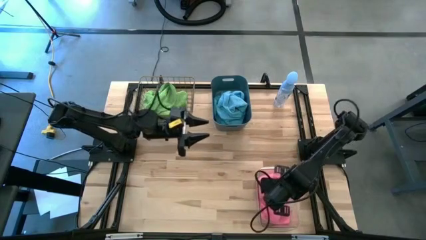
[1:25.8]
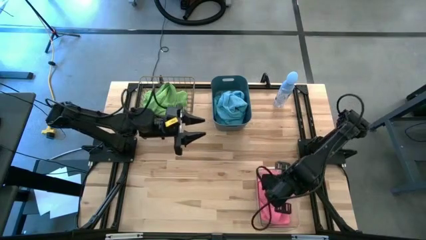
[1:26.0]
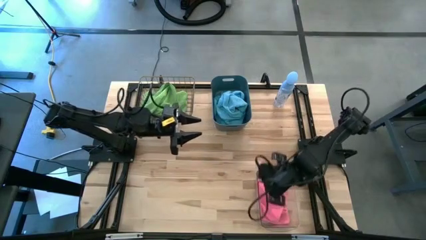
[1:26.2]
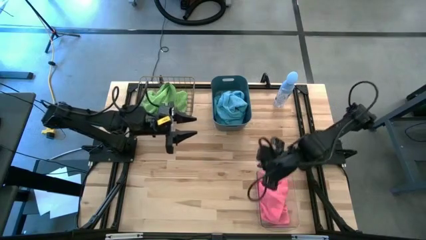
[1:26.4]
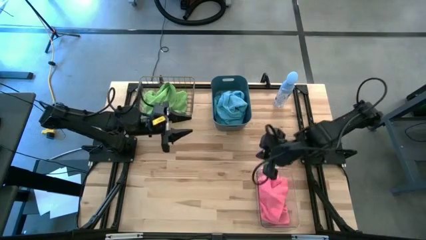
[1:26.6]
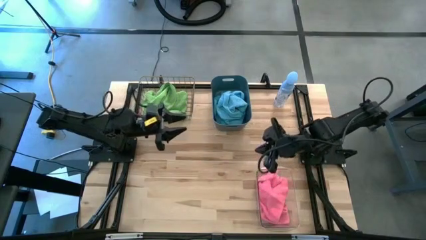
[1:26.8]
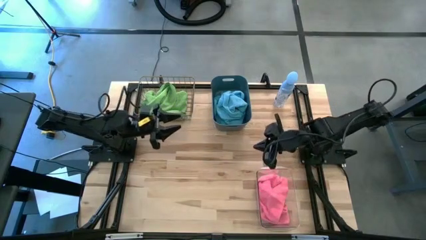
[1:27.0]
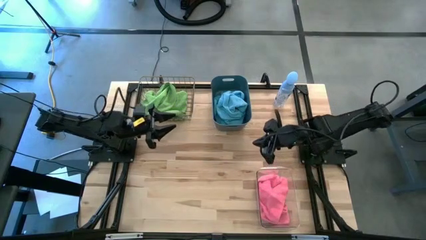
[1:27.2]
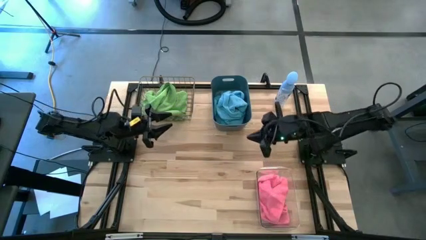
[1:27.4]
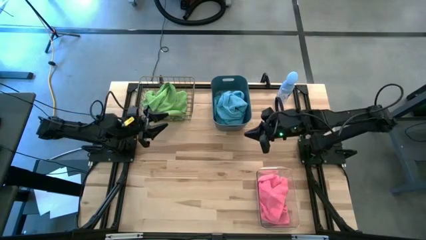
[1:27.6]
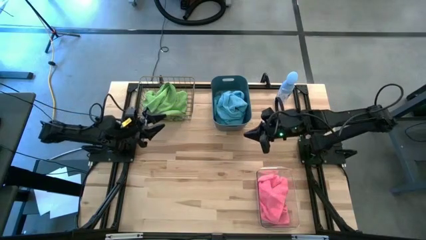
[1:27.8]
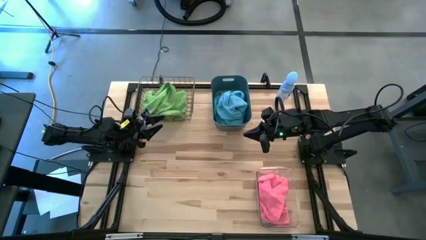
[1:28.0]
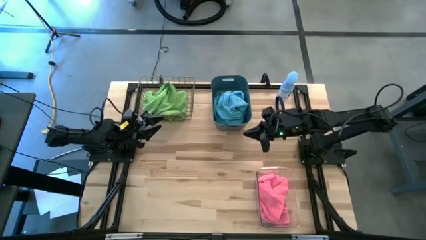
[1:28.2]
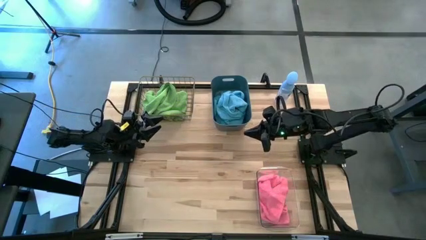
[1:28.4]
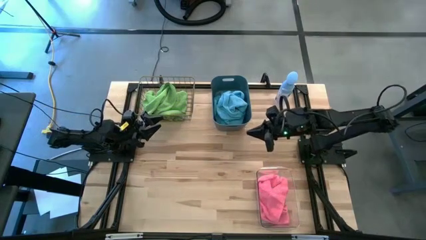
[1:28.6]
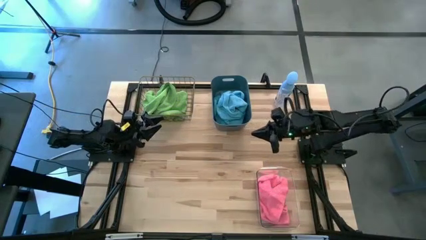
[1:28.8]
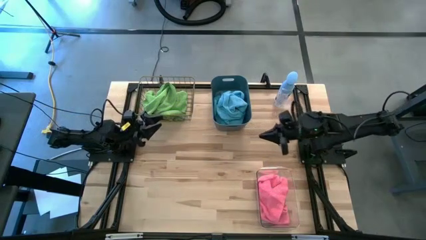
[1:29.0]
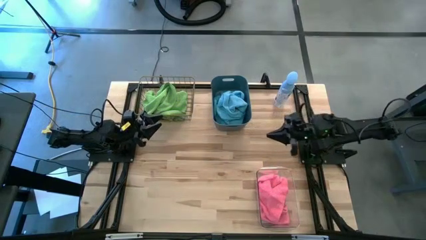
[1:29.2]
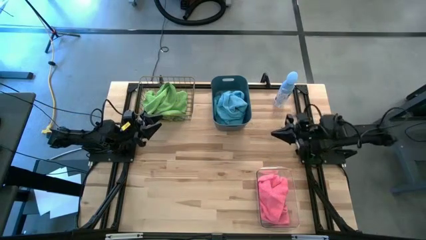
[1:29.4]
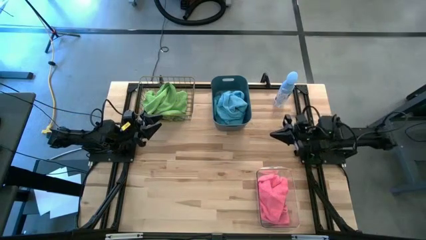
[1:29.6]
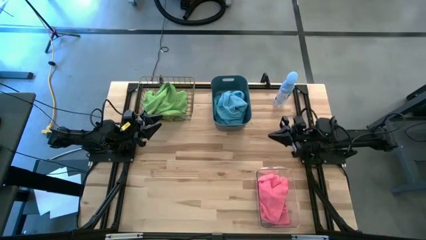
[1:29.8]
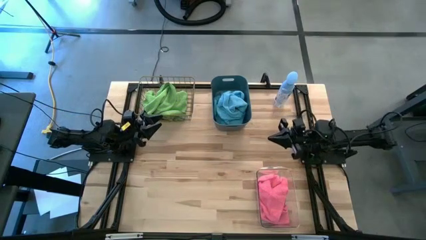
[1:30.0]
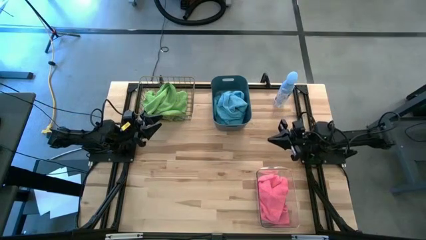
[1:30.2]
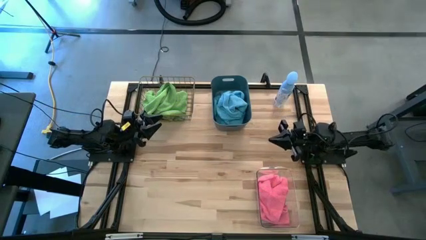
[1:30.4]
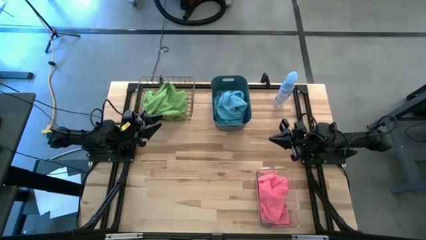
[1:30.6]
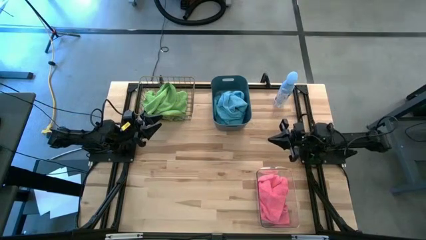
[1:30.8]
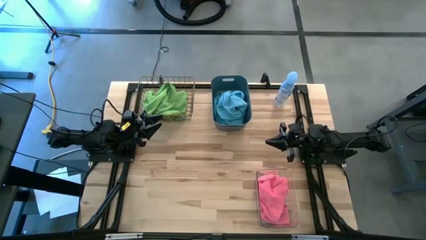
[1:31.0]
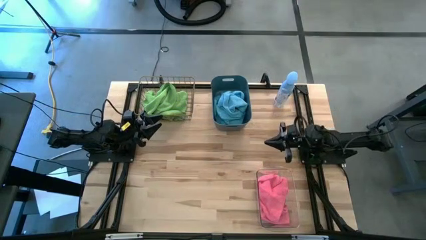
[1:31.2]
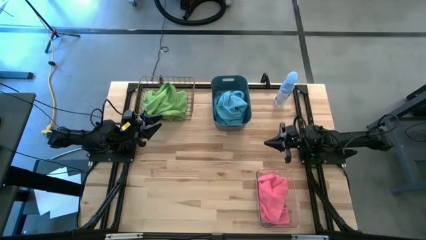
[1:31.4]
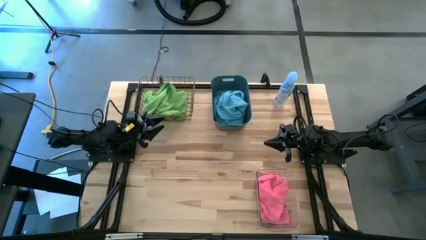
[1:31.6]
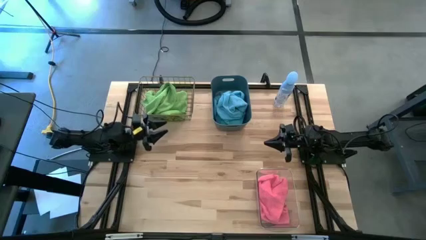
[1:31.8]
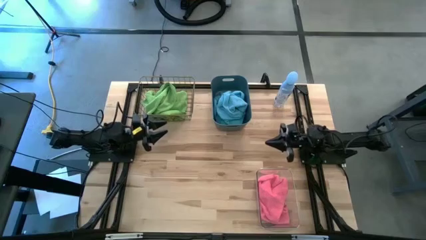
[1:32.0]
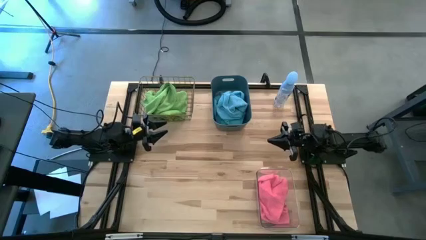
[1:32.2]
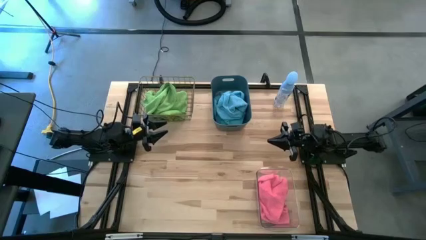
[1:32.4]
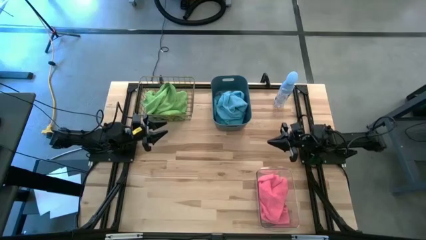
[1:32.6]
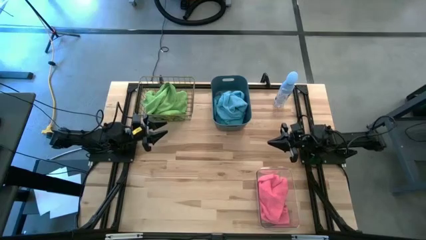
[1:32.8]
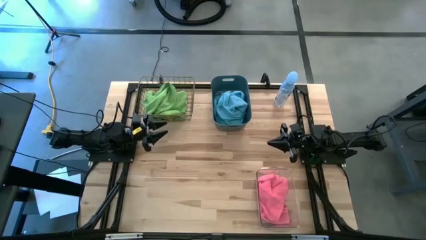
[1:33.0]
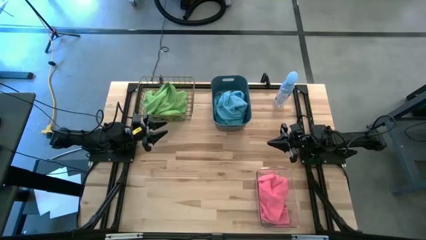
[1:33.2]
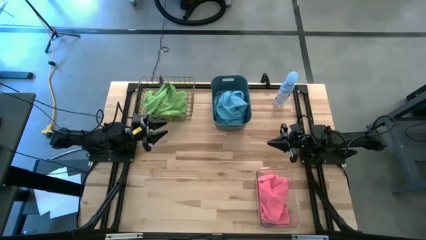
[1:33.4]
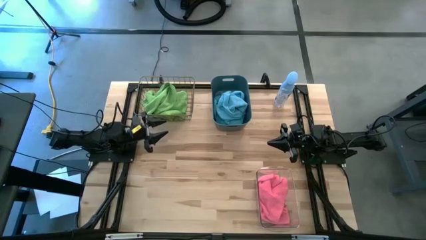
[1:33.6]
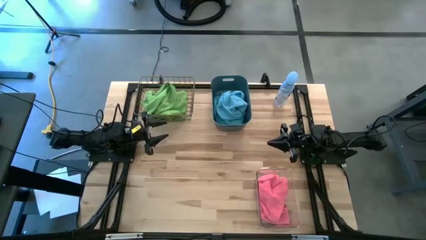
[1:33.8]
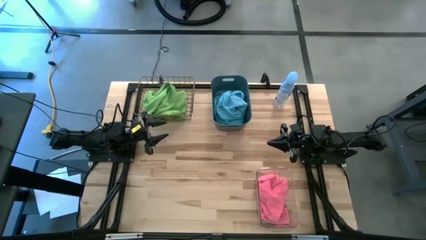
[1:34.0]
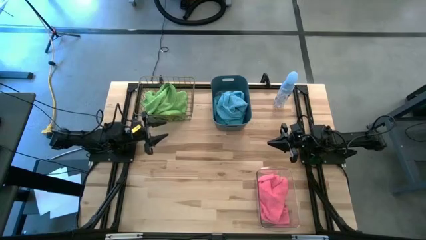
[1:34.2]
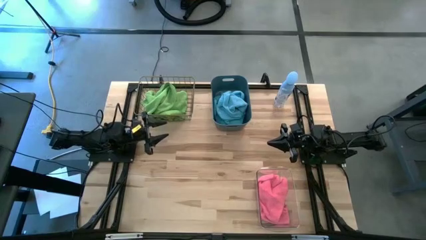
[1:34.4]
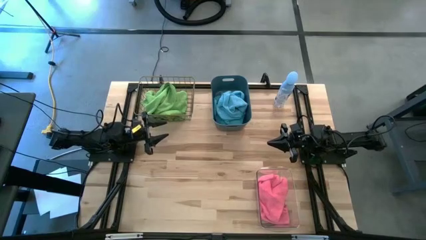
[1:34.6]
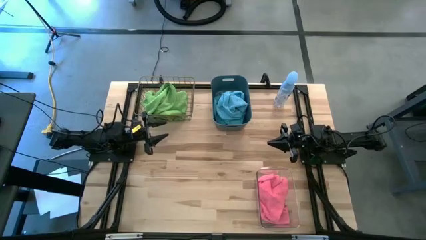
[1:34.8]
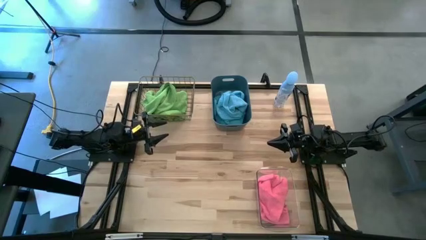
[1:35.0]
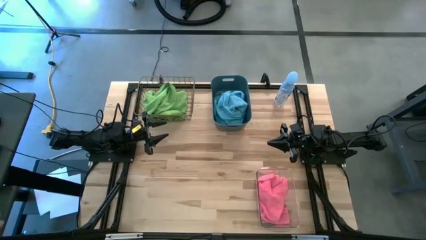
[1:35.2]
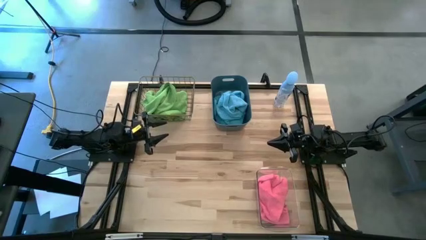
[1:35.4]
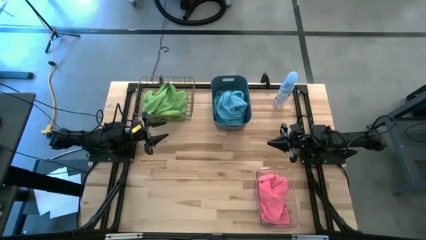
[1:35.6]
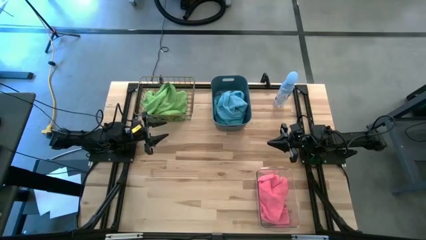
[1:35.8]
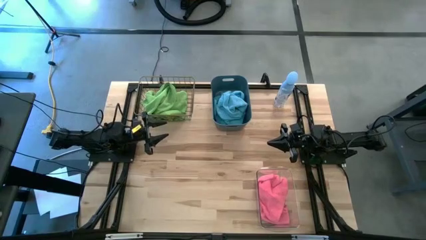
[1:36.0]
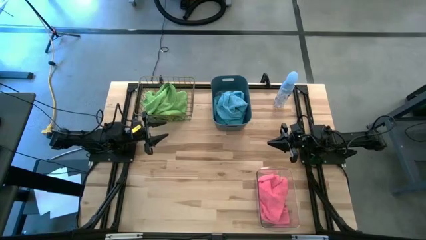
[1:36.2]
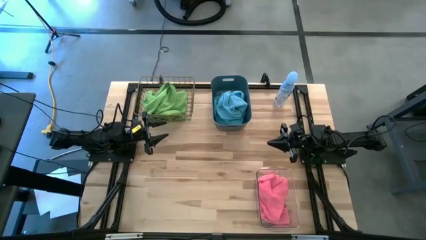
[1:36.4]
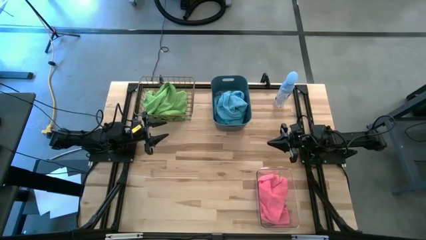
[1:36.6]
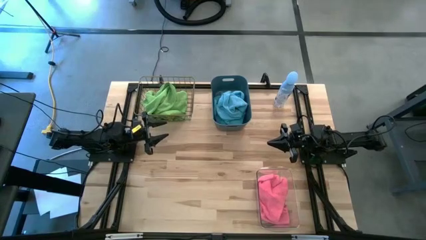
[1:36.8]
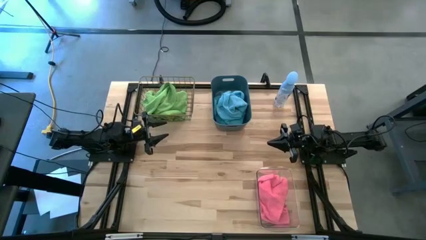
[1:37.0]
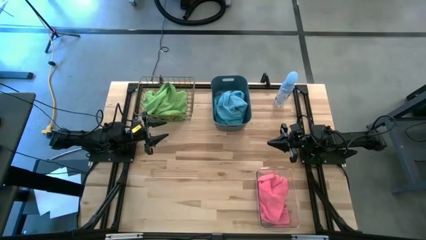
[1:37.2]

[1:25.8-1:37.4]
Task: Sort microfiber towel by color & place in baskets
Return to Home Position

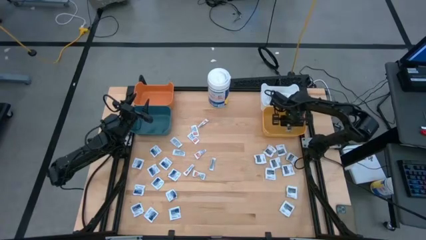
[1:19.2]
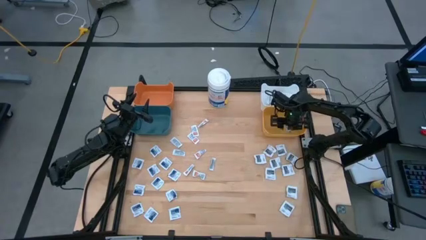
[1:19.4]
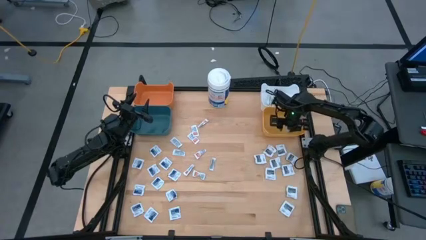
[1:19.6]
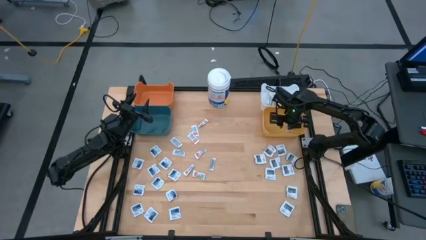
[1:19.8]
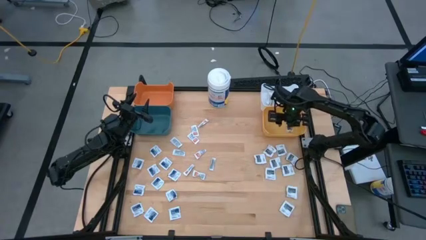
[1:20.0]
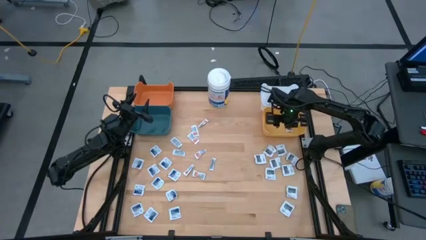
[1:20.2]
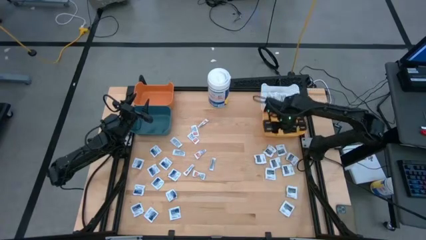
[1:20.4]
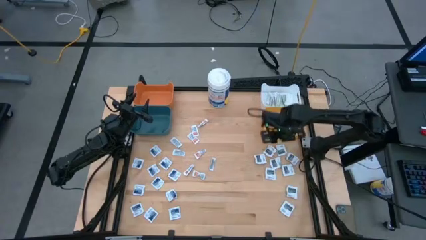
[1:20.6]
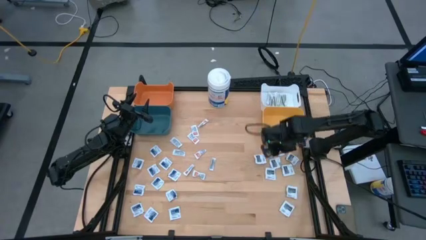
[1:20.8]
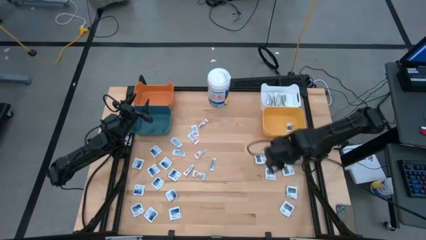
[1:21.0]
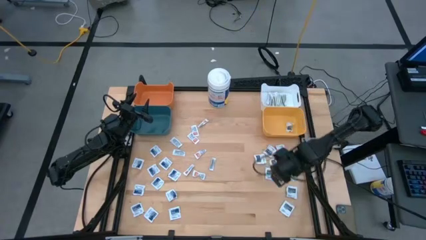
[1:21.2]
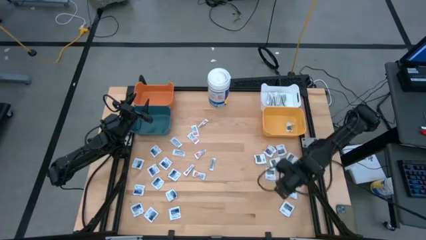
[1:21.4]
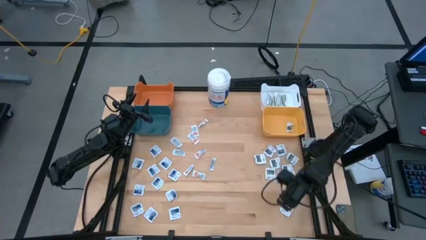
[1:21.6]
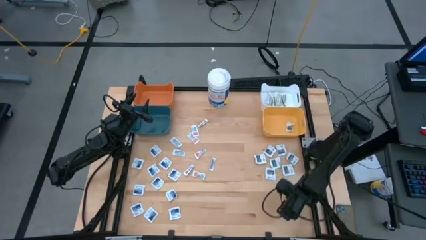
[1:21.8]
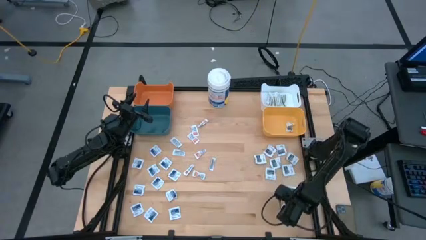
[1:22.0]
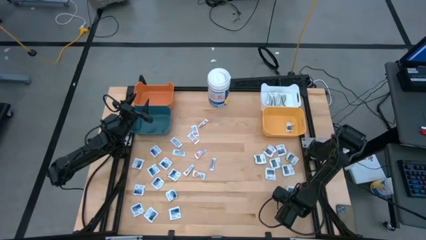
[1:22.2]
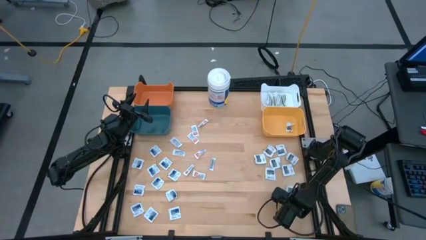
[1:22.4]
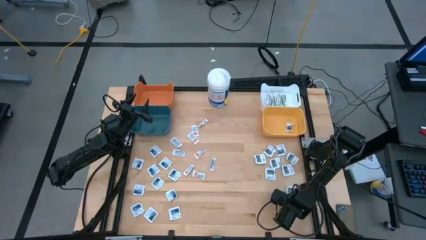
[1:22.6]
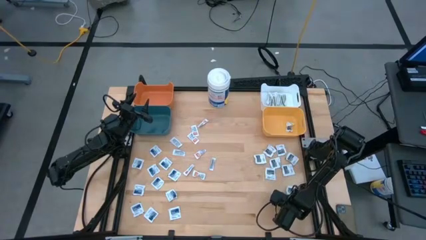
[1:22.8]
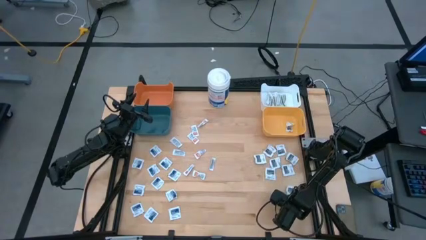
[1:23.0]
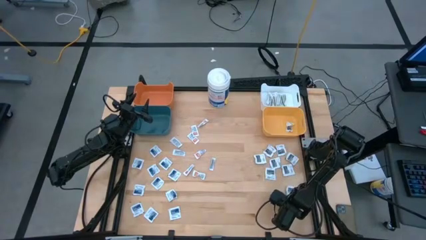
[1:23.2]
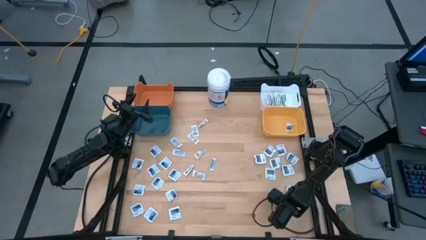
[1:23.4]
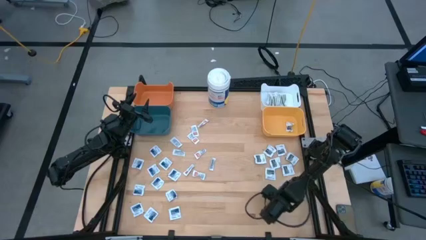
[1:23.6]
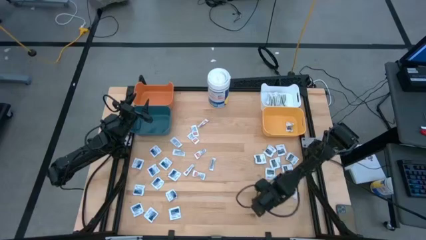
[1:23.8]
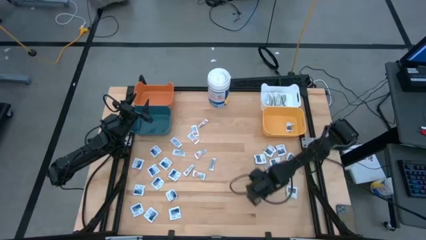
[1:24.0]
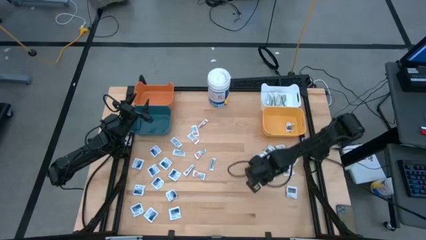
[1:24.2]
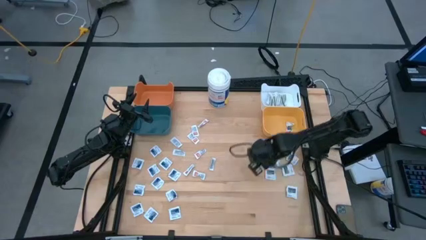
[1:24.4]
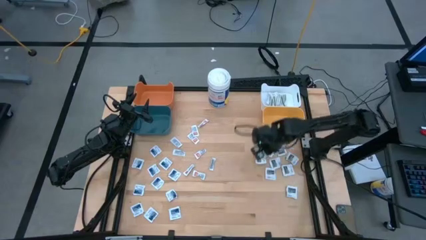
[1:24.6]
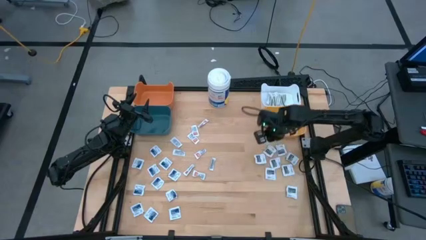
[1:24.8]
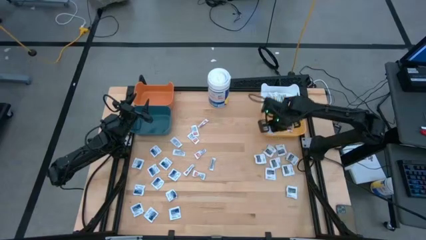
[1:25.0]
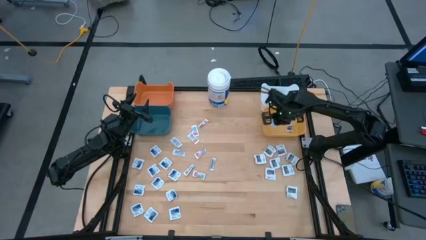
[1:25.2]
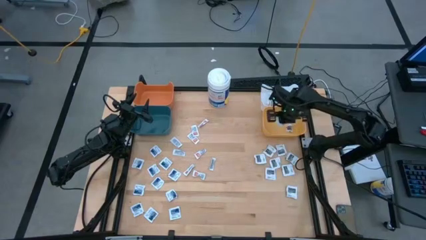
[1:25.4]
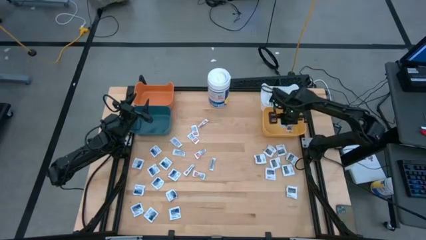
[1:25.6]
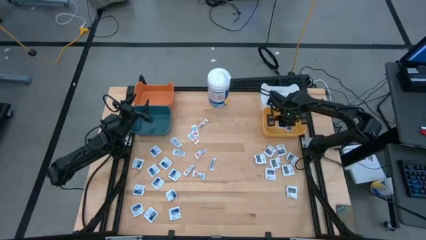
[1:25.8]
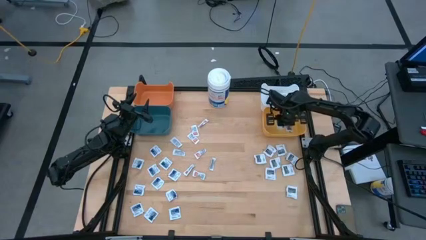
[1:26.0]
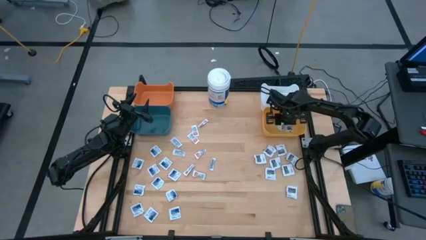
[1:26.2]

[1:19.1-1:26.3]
Task: Pick & Place First Aid Supplies
Put the black pad into the yellow bin
